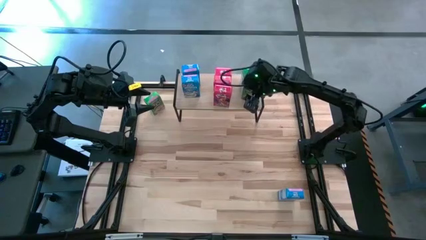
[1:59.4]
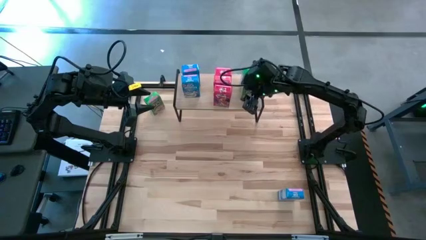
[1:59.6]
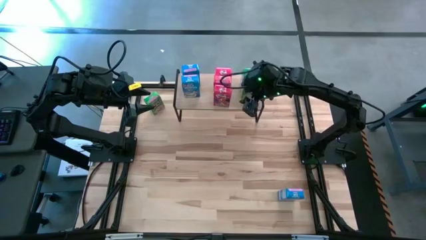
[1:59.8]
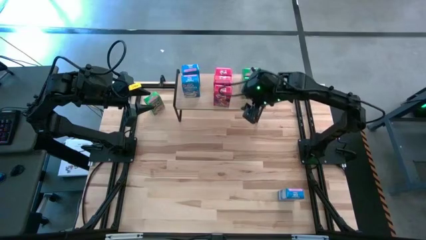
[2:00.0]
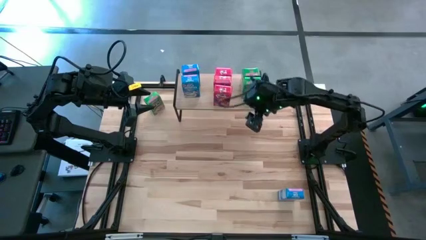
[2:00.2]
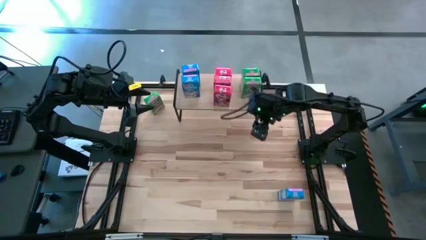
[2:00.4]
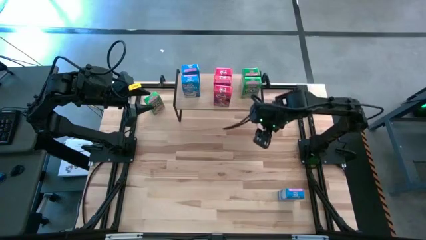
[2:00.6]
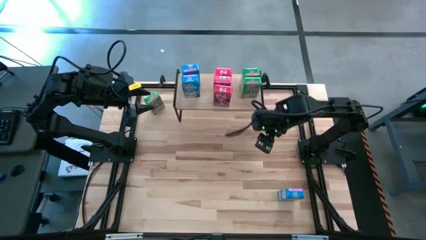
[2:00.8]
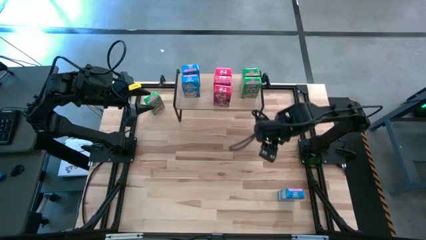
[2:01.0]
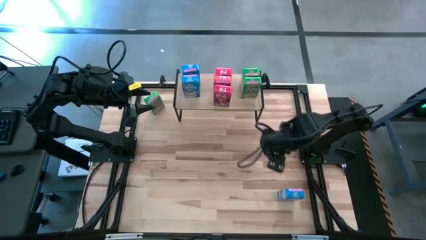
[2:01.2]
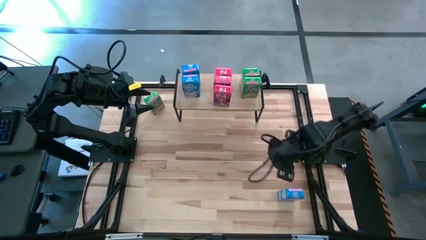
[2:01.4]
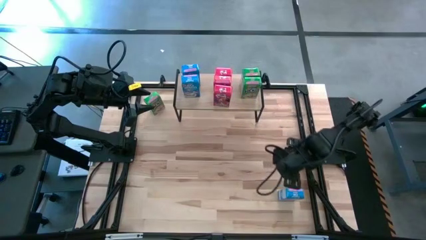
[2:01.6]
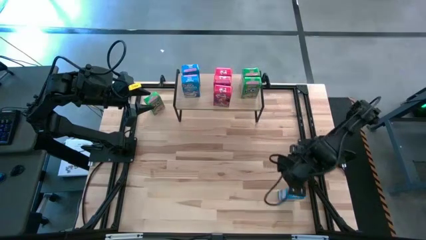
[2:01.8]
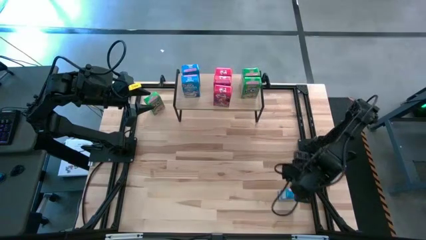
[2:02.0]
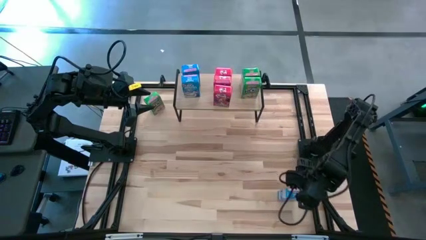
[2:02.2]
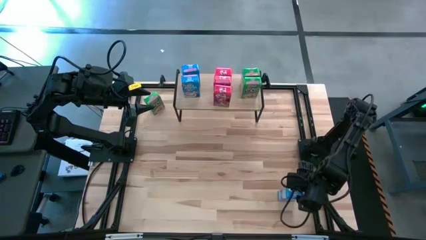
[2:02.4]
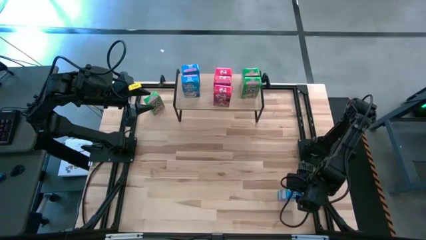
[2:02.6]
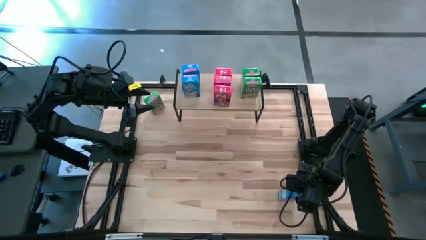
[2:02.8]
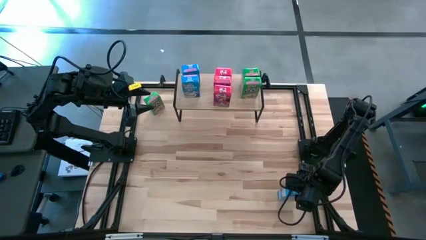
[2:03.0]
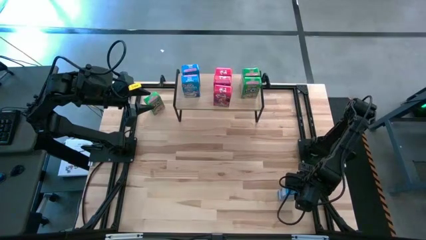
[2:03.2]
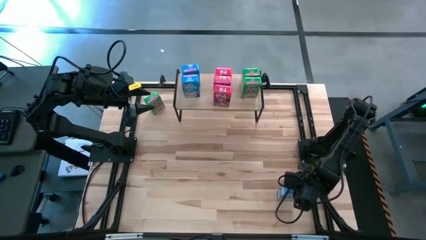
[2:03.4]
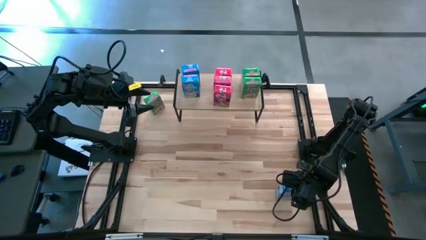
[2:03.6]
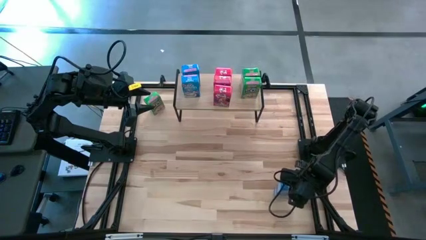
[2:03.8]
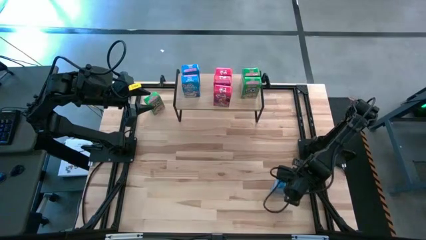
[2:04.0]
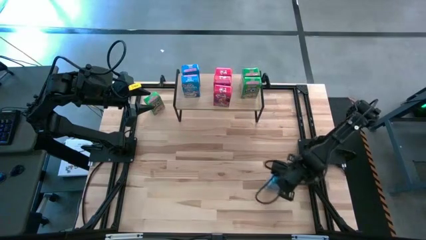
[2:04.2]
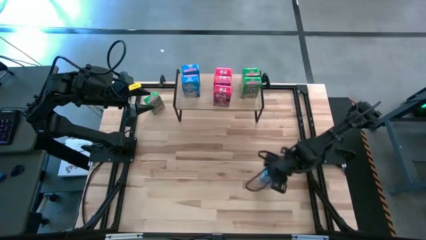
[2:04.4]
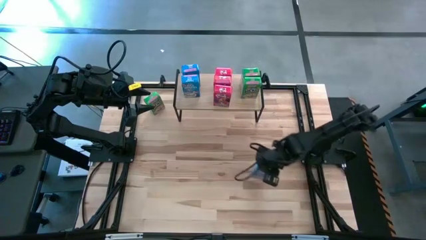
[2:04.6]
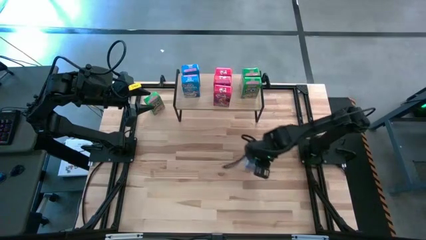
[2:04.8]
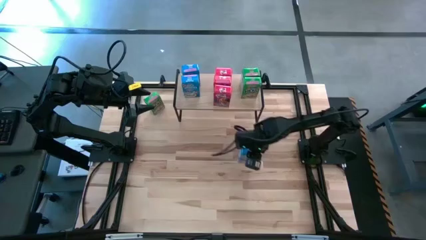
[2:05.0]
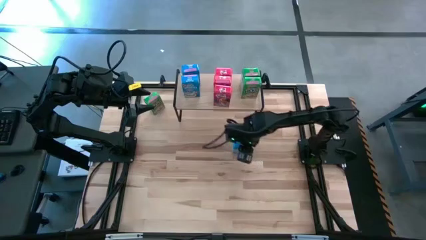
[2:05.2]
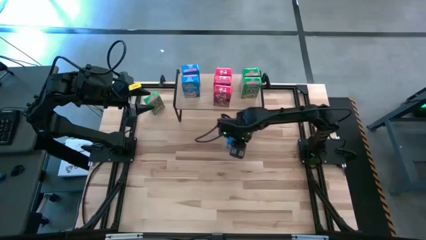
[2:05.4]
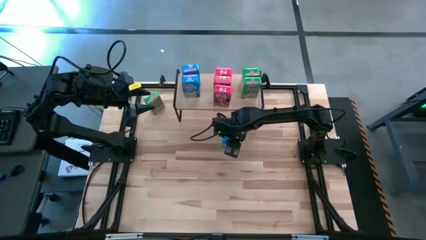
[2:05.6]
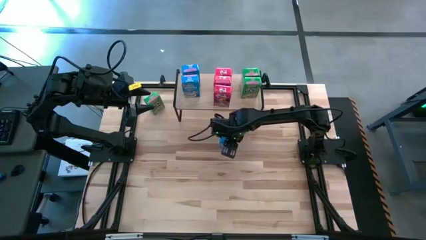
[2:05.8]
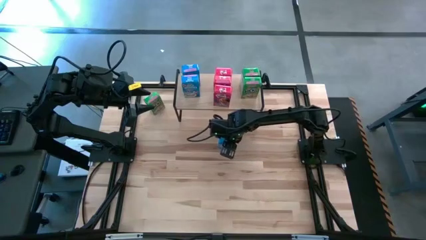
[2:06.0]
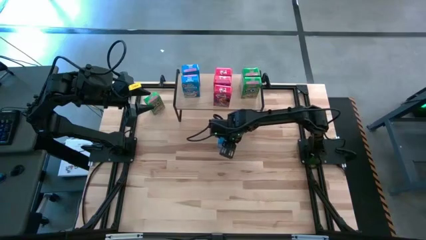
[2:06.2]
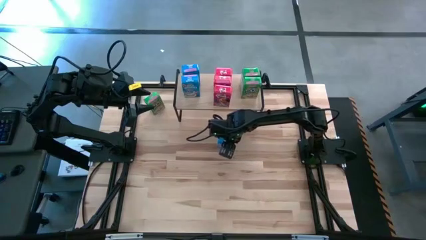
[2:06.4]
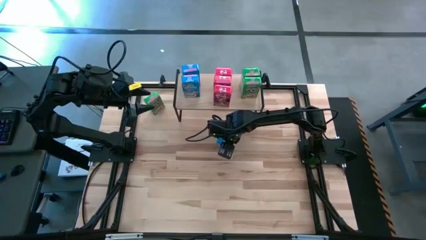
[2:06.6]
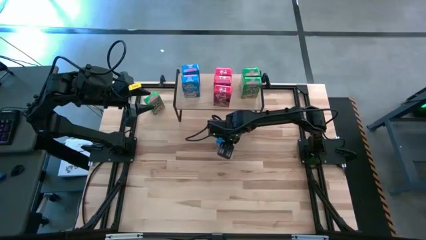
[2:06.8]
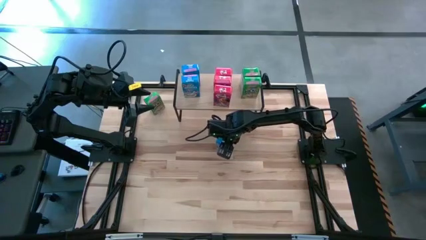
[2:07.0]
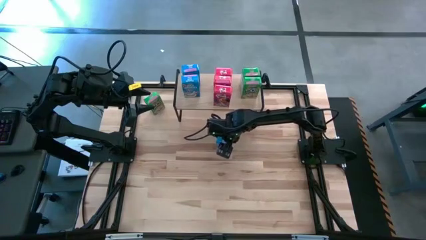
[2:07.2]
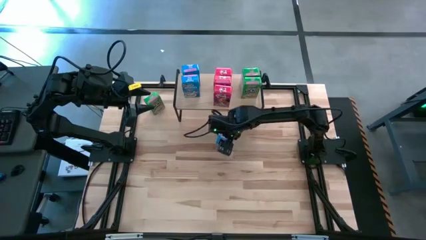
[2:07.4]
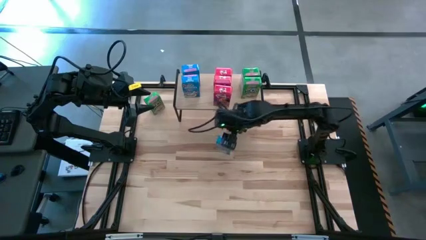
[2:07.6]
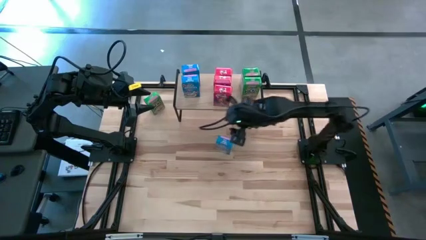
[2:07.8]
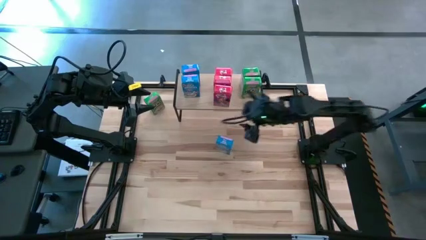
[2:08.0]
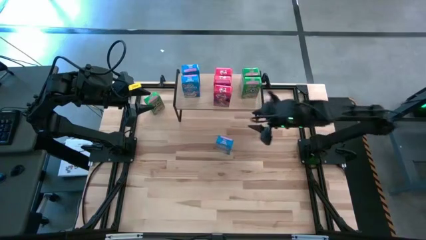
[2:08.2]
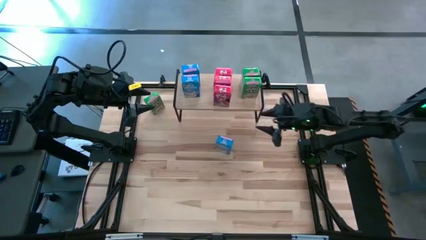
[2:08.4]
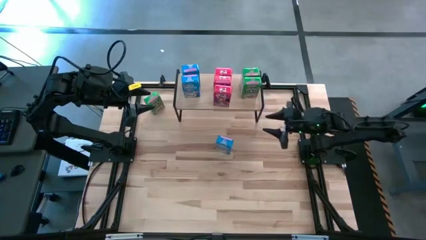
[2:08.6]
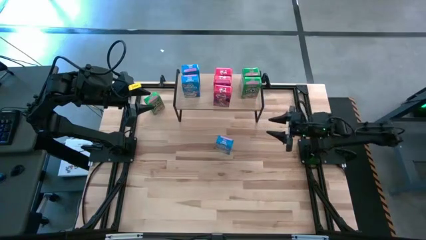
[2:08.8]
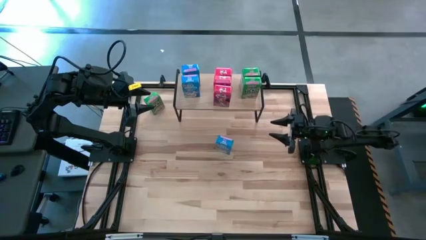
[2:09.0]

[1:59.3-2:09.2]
Task: Stack cereal on shelf
Put the blue cereal box on the shelf aligned with the other blue cereal boxes

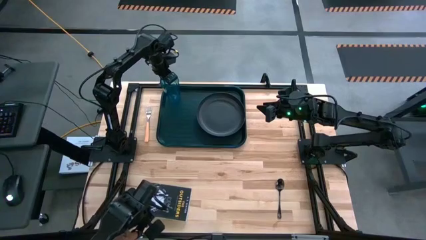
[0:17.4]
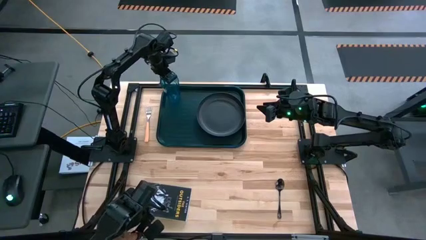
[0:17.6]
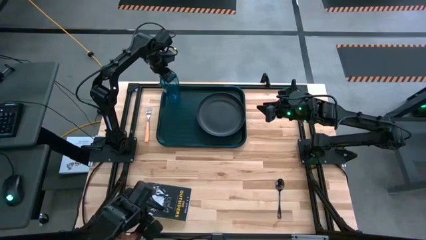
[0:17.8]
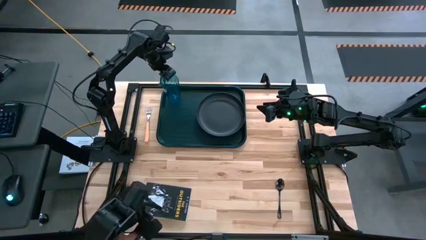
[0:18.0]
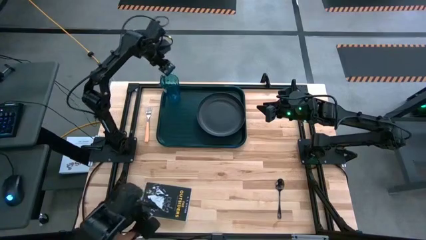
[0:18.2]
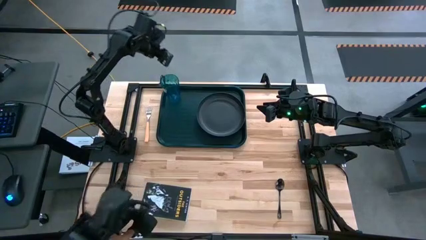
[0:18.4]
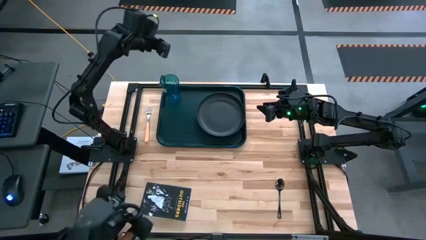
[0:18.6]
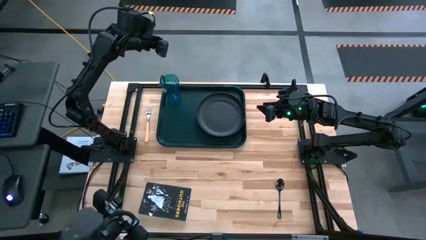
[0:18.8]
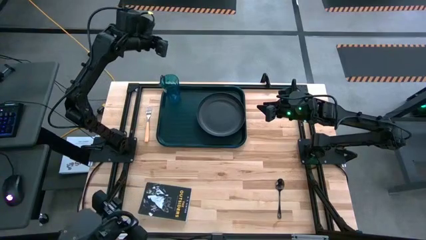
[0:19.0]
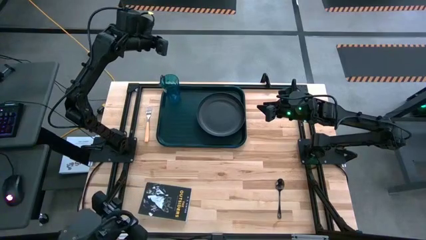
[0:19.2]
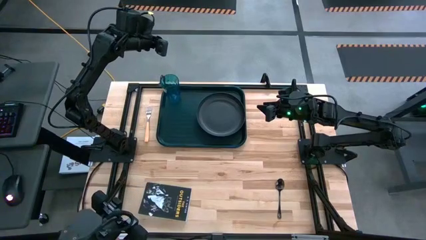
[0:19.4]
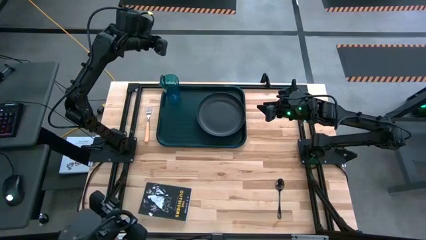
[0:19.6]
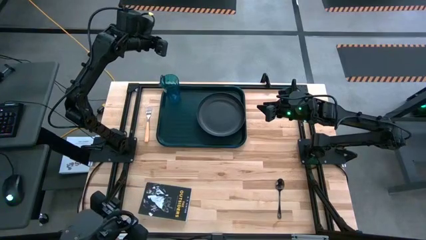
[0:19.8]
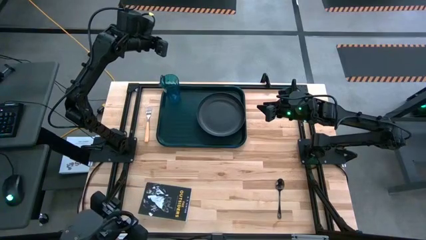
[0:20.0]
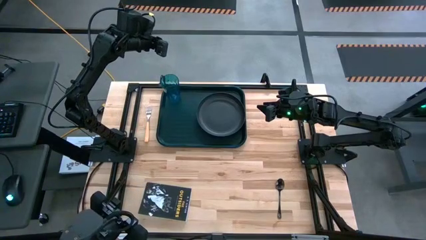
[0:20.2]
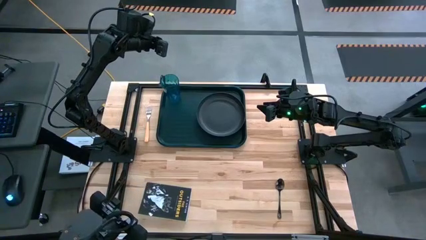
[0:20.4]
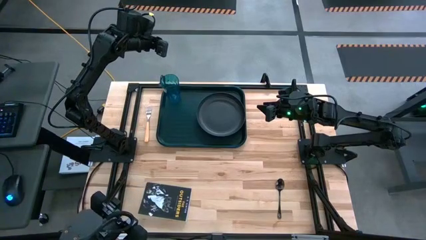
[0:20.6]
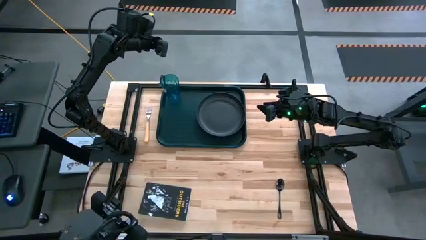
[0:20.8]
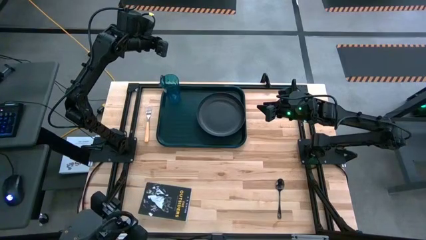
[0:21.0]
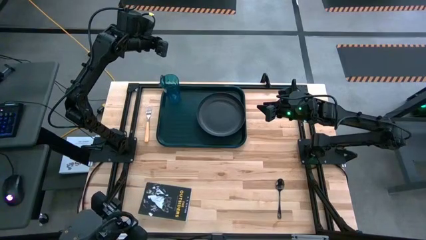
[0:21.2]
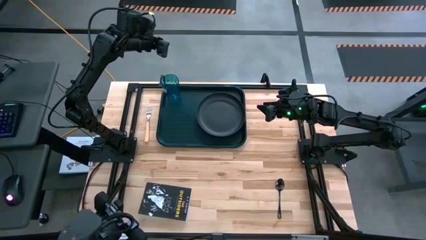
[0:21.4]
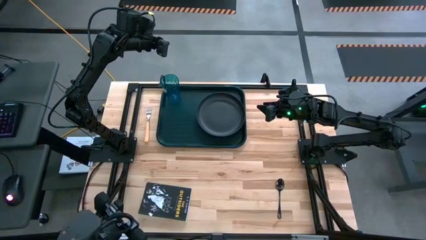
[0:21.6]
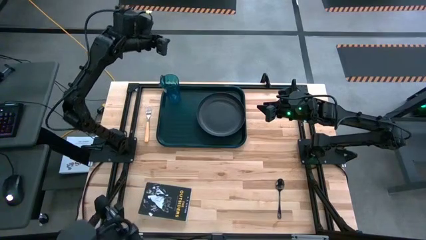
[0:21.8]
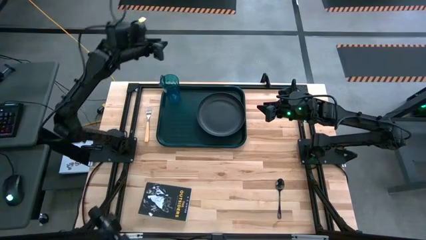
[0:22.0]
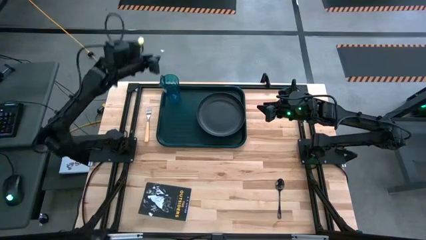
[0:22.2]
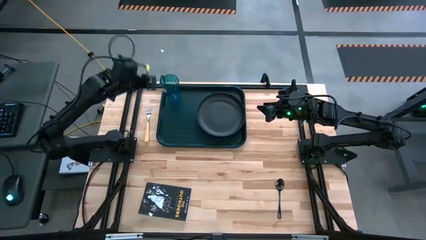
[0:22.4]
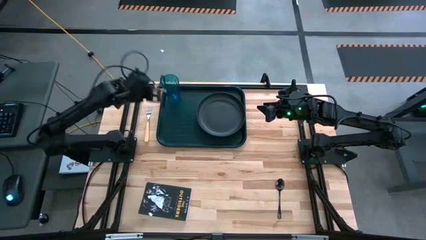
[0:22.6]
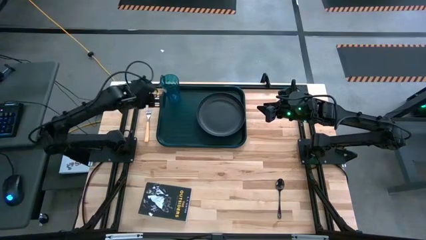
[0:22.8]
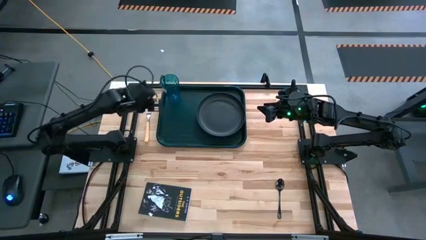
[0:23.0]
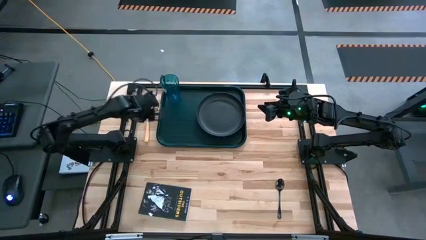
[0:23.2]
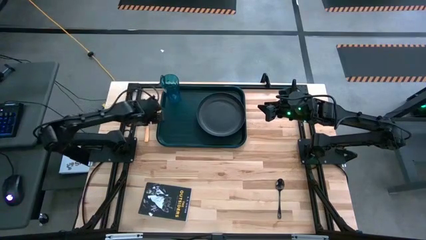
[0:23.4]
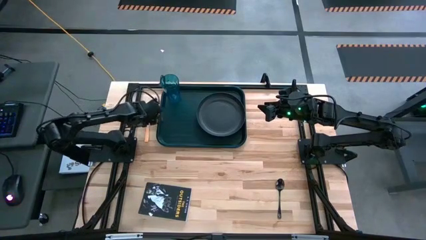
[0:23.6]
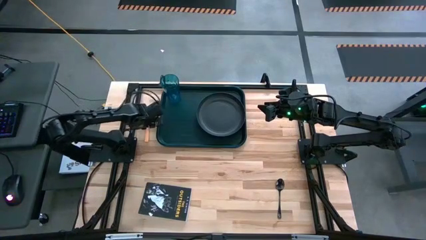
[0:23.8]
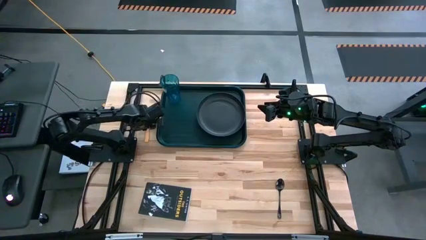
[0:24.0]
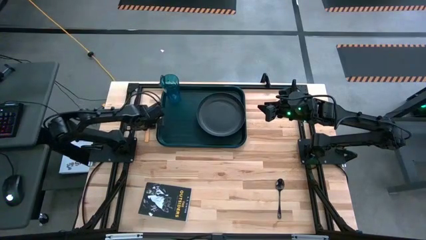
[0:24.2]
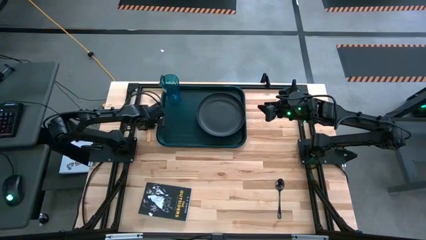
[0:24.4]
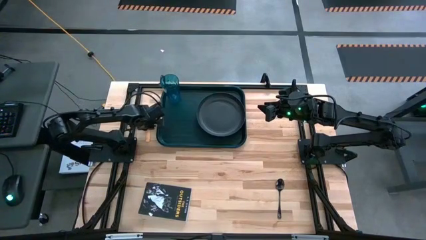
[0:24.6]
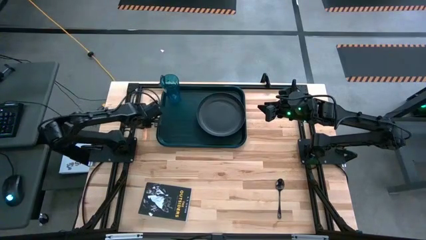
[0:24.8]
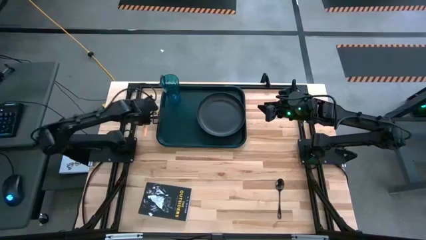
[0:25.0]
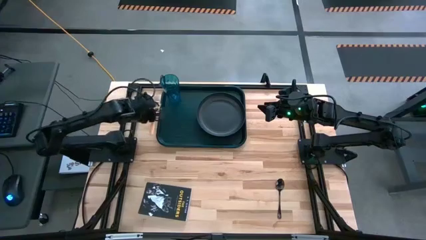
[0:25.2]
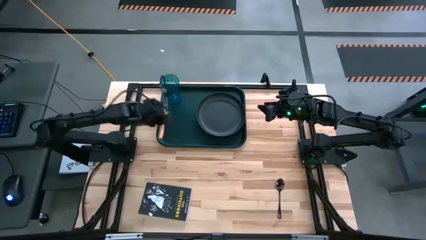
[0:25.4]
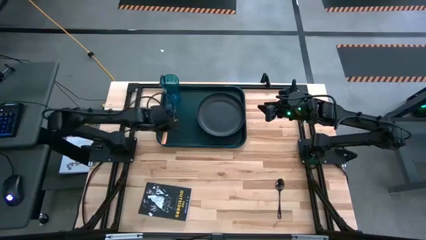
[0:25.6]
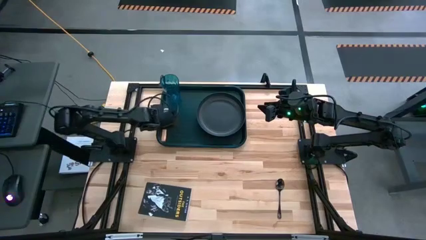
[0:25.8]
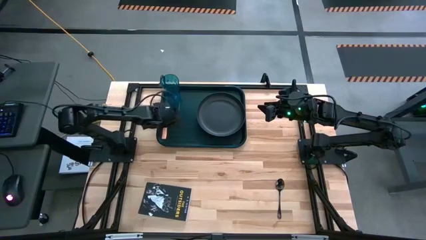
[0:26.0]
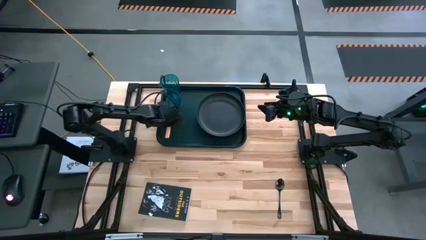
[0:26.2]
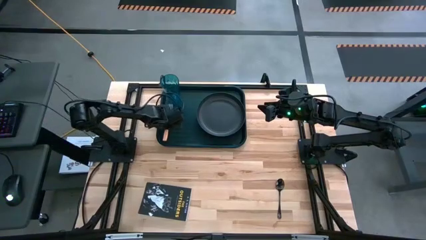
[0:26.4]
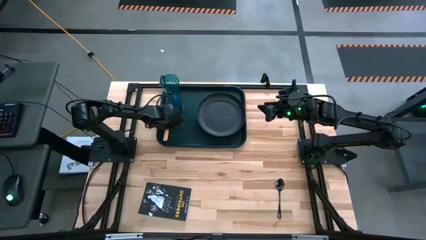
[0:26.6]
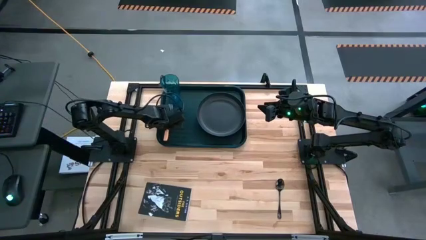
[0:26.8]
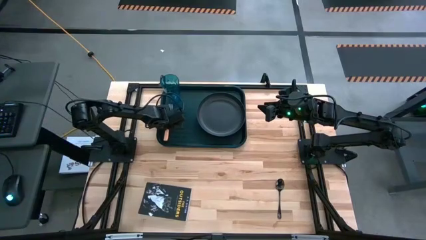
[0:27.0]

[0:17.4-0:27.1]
Task: Pick and place plate/cup/fork/spoon on tray
Put the light orange fork on the dark green tray to the bottom of the blue cup
